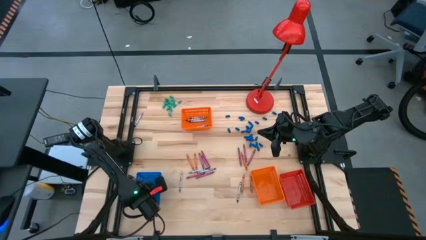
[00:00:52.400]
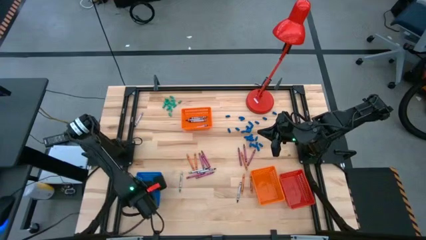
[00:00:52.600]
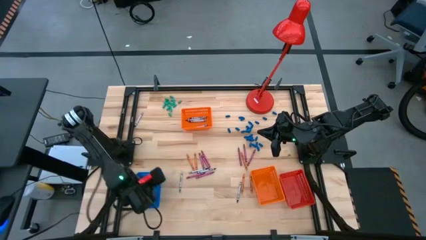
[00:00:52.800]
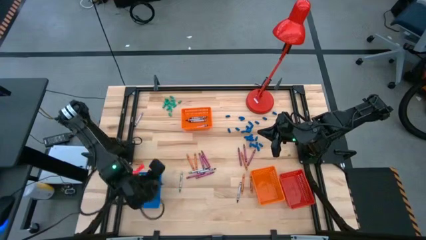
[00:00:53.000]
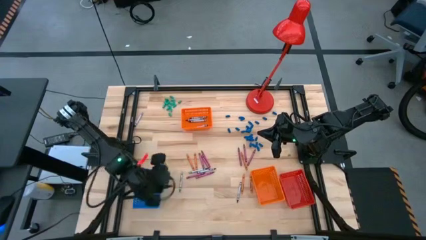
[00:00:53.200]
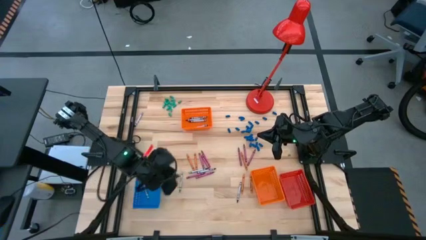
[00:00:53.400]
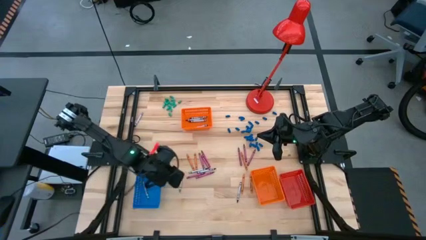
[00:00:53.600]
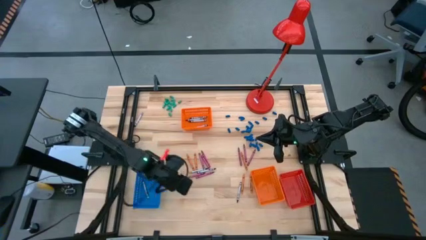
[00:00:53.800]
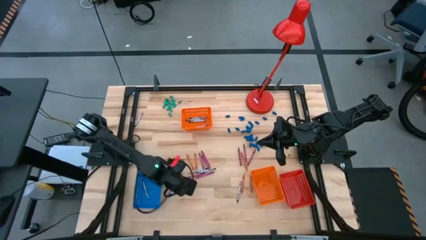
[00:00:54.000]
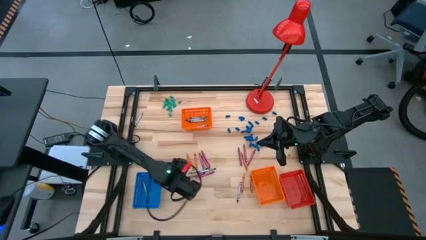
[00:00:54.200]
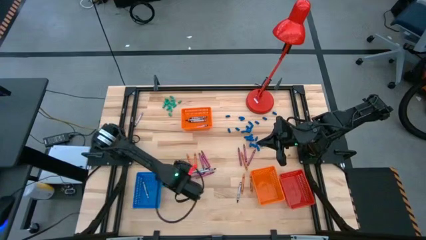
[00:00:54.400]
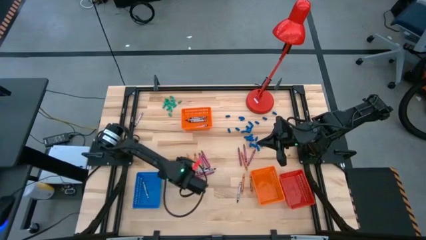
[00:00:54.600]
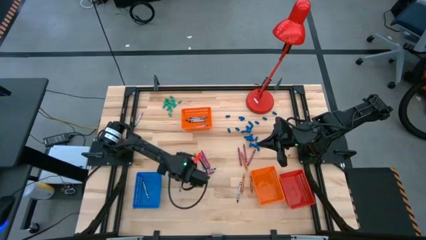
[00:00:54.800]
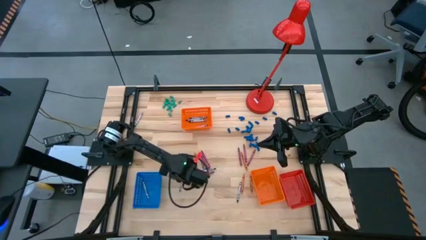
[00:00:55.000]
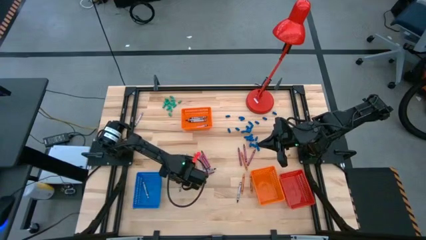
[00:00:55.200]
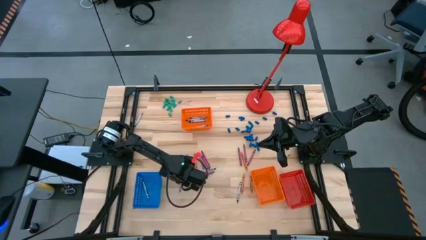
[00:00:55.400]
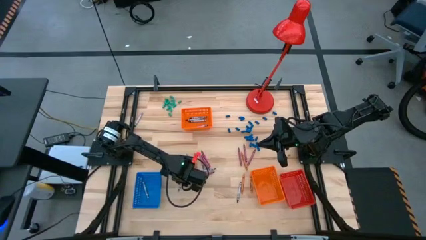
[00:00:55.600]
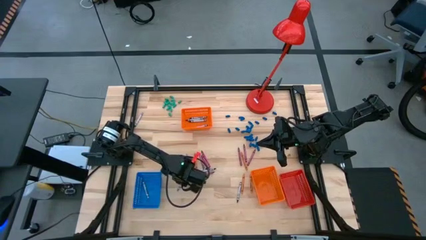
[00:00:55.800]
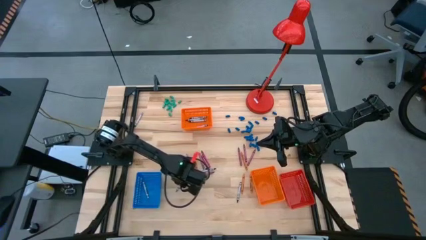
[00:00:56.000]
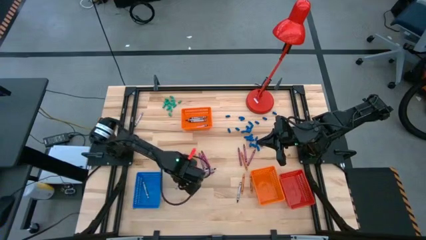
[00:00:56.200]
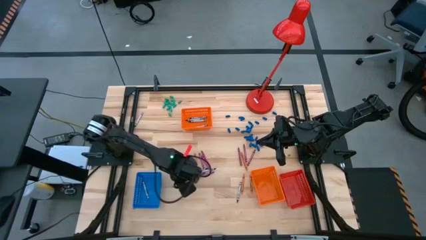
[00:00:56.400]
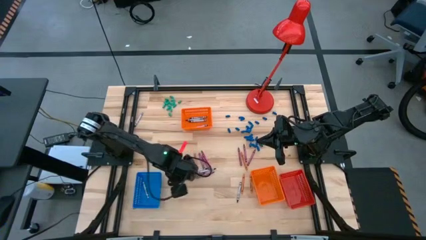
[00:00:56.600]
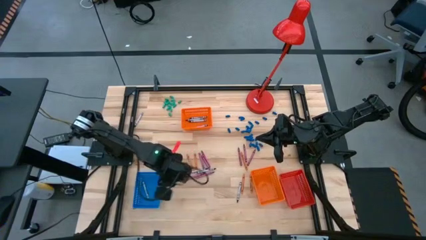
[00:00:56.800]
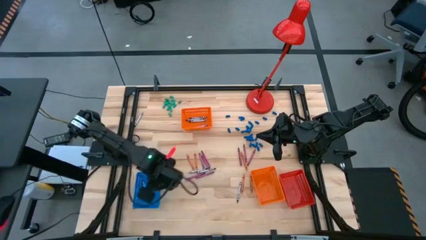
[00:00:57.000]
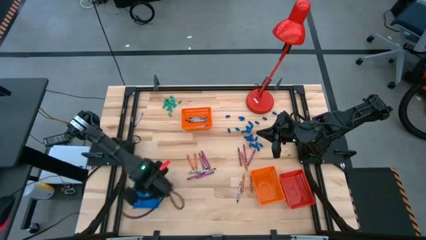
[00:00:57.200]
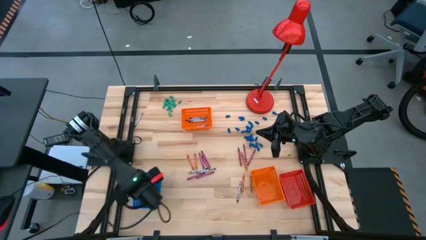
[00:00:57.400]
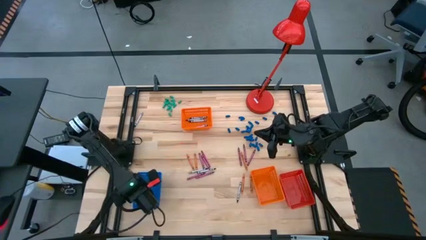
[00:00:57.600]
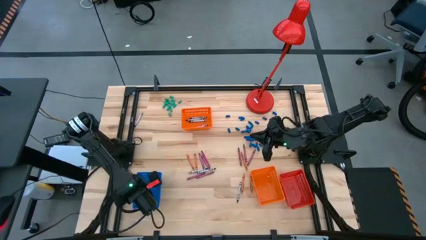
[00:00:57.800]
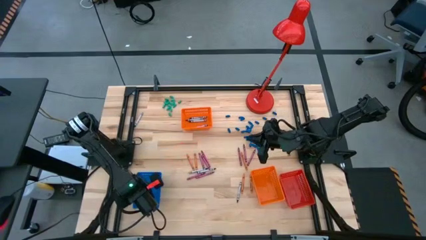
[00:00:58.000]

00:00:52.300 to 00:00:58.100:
Task: Sort crayons
Put the gray crayon into the blue bin

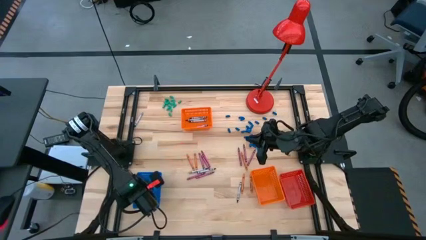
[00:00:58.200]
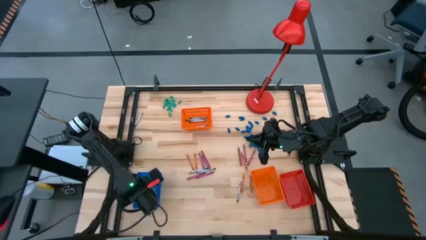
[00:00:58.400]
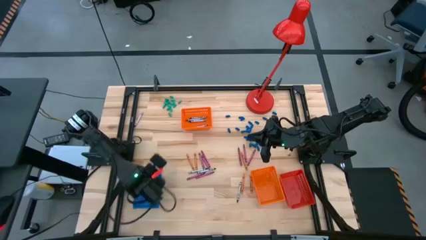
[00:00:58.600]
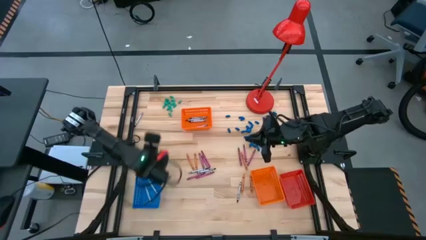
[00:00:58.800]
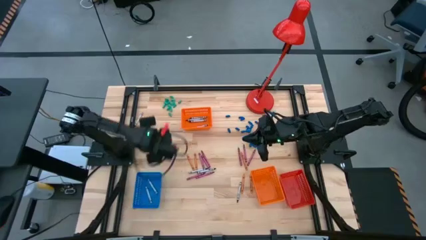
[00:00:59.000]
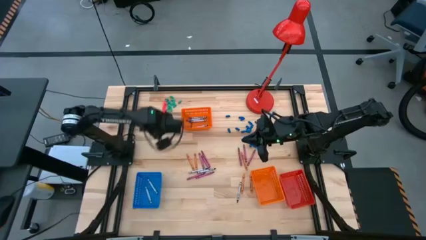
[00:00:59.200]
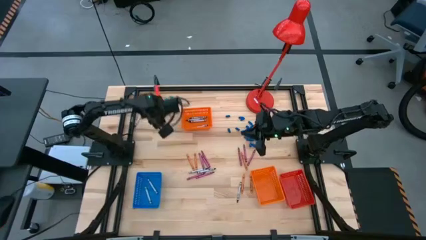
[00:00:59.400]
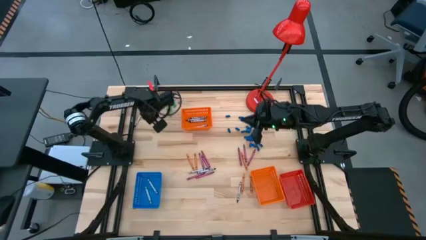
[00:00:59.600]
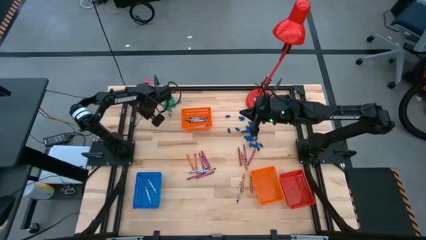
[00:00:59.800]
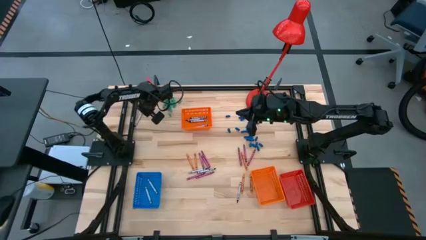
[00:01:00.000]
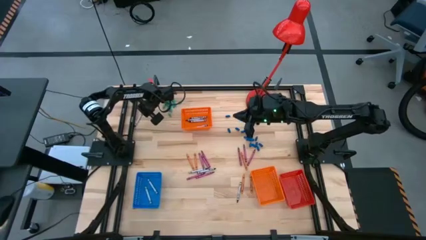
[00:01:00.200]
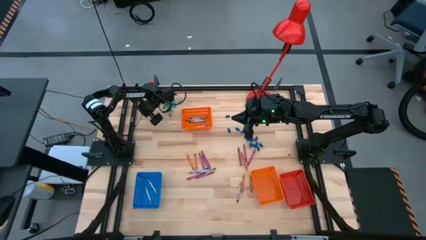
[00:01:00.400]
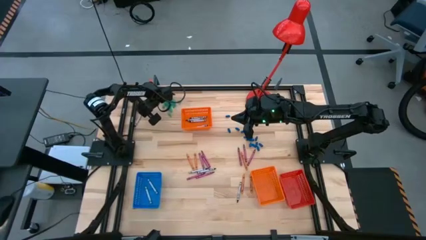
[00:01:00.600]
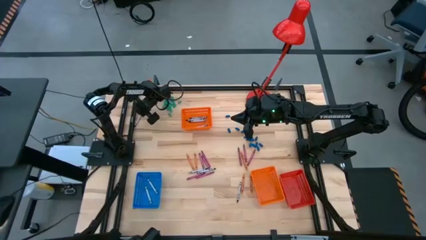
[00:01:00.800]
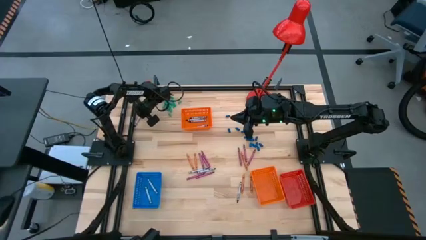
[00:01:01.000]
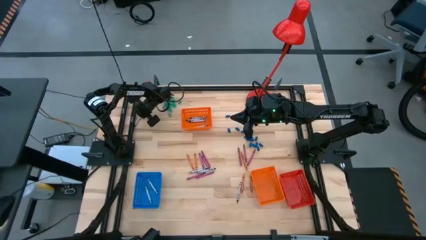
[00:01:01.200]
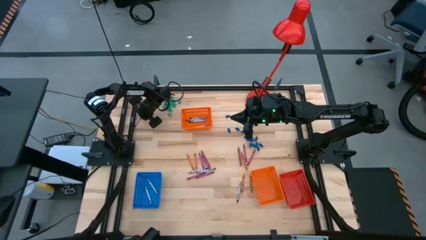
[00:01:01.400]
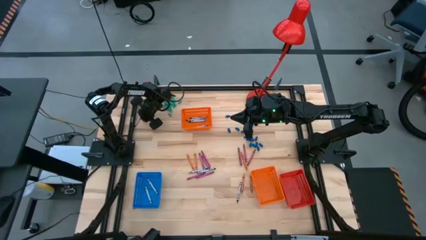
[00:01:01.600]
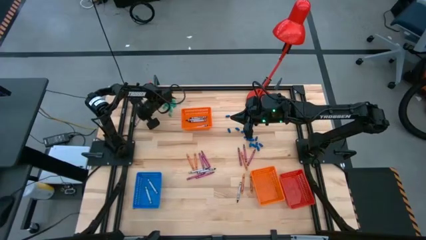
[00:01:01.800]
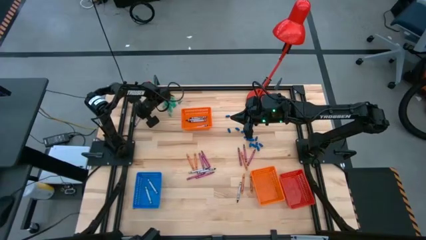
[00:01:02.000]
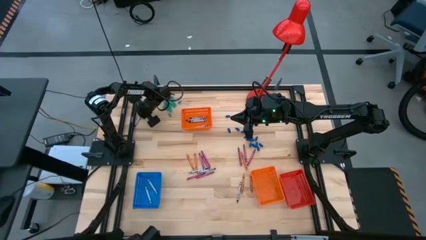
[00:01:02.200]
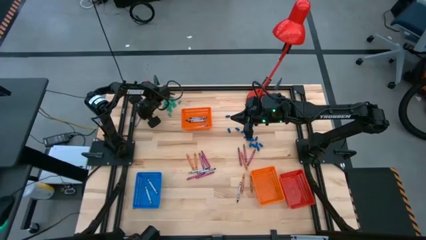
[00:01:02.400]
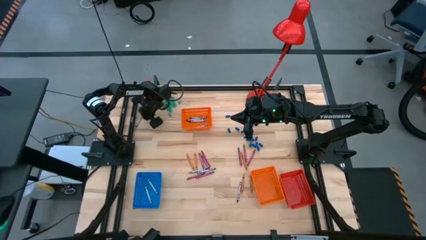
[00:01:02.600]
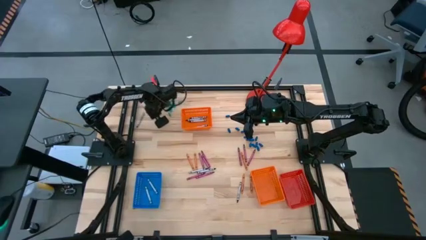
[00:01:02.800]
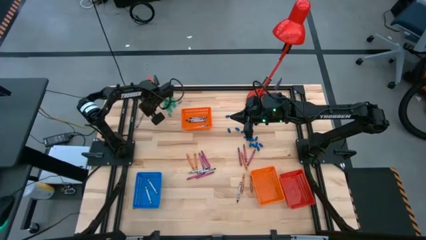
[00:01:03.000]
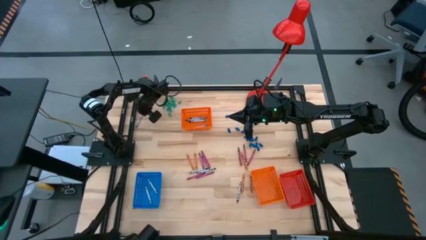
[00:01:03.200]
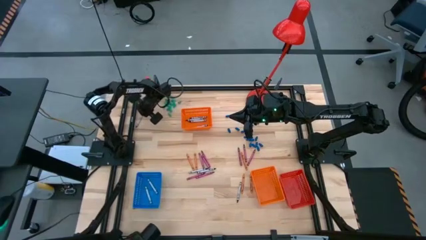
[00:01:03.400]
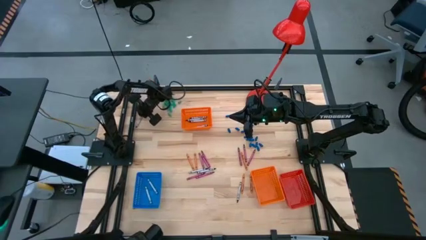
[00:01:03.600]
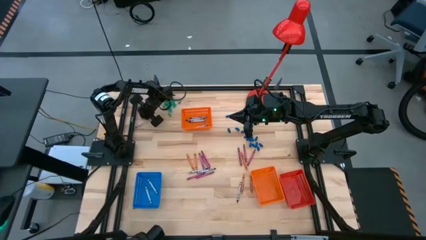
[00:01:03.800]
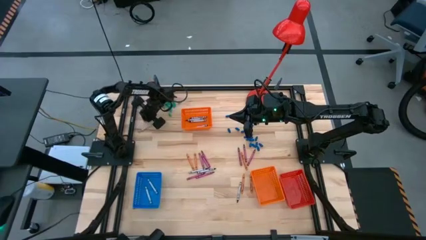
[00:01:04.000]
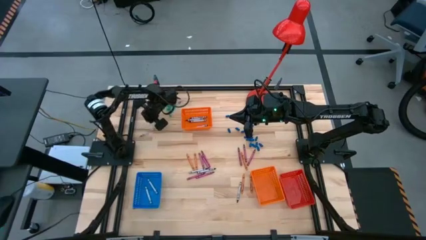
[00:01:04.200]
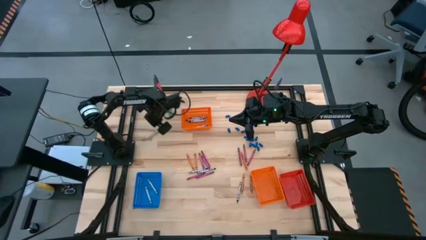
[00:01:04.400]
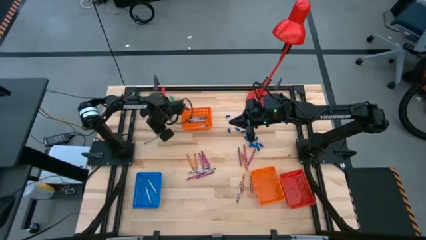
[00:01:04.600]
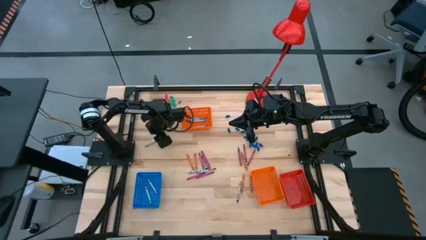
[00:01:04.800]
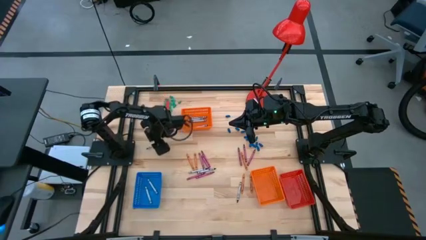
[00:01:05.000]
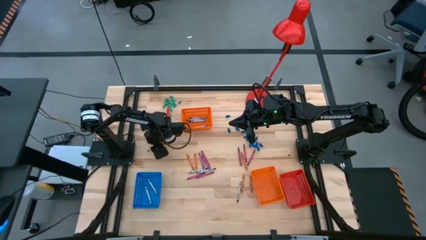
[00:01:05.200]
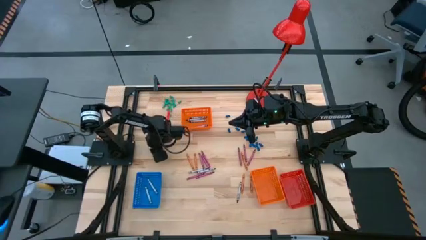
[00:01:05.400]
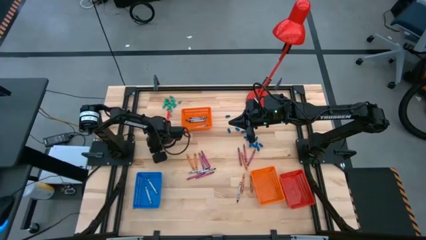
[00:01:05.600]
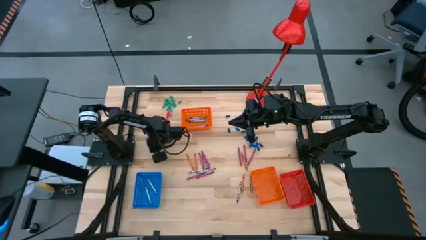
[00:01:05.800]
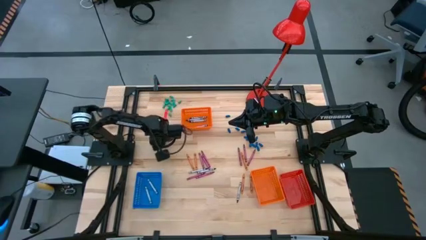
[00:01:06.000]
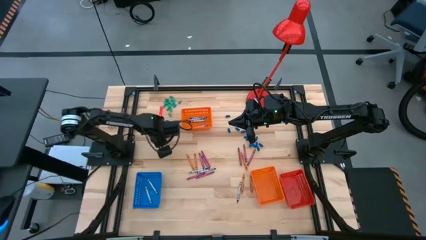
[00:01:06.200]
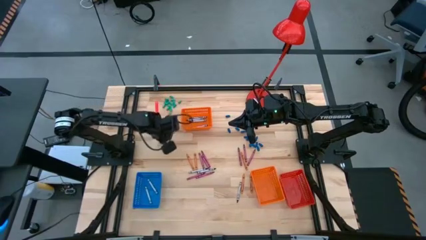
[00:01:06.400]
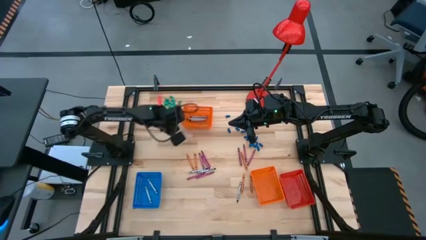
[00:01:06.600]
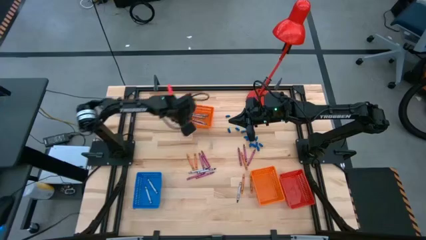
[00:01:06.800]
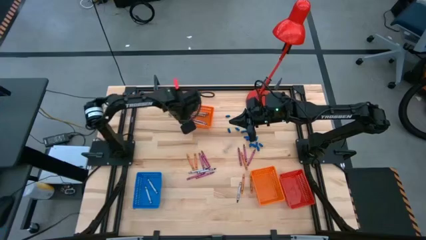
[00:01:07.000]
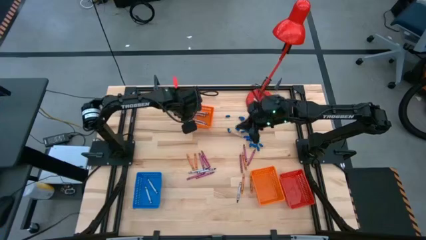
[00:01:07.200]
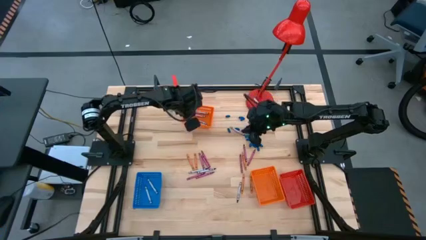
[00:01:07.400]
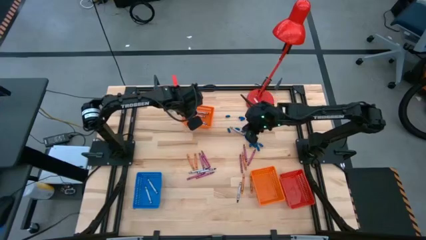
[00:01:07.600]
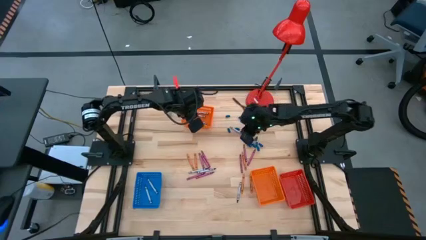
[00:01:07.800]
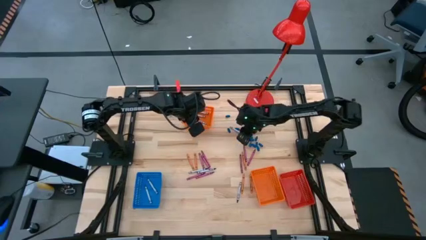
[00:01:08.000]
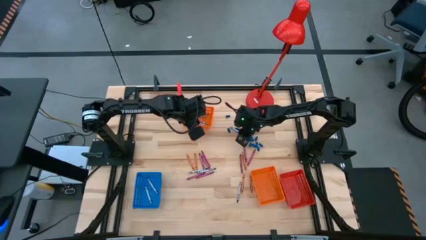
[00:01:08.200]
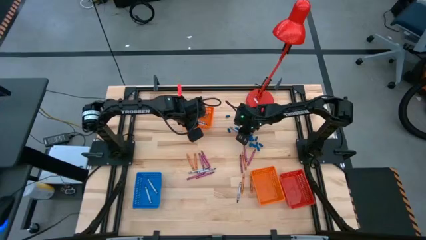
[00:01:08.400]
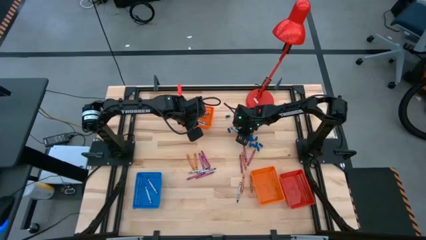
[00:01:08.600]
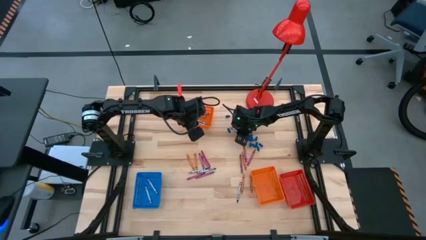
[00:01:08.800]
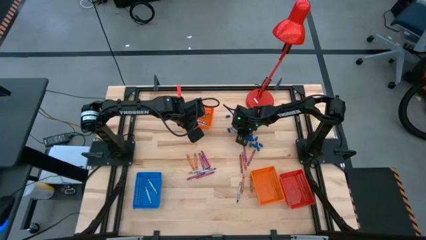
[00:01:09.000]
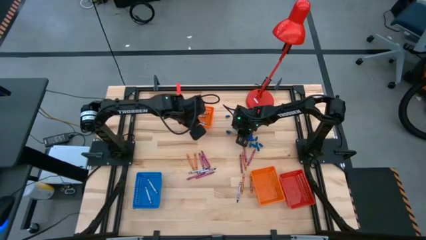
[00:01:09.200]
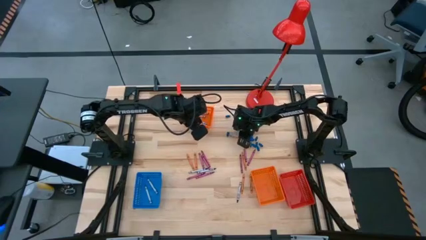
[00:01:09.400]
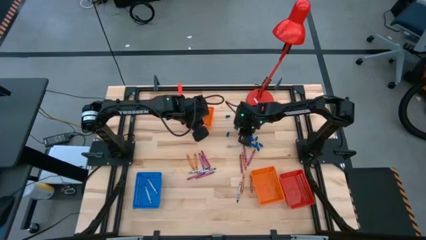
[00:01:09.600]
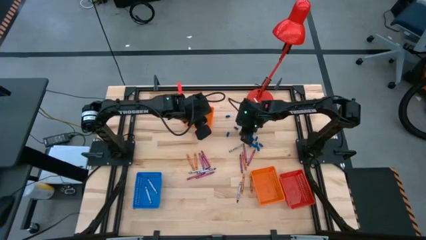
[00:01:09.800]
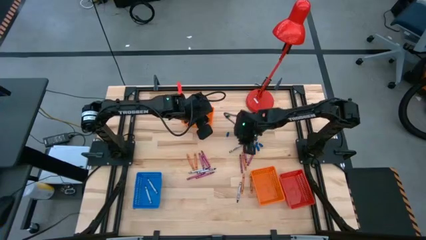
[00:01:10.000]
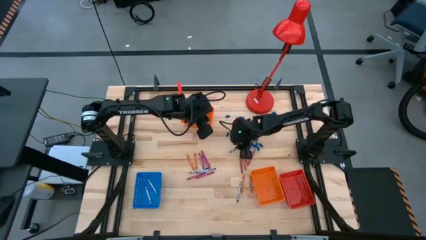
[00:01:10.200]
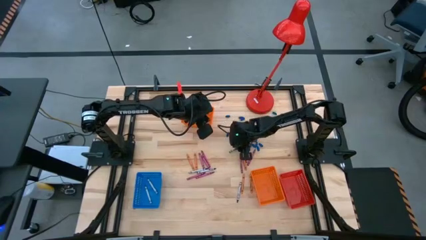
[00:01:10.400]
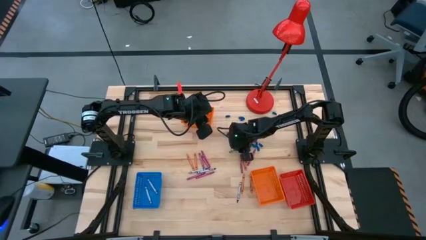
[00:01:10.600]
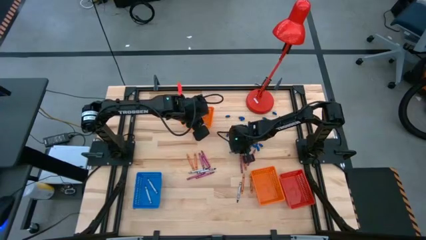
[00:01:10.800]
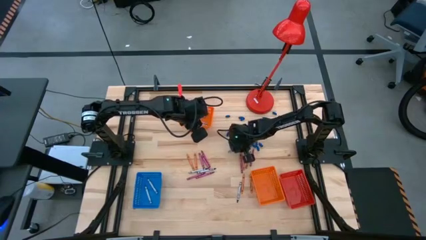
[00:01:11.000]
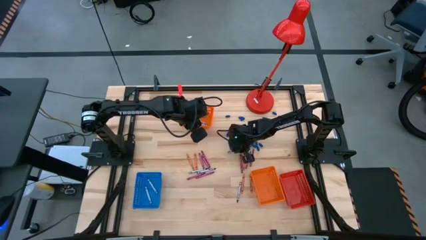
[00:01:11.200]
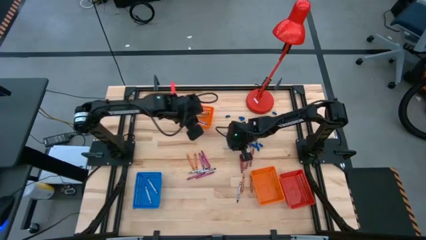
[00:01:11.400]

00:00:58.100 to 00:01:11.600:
Put the black crayon into the top orange bin
